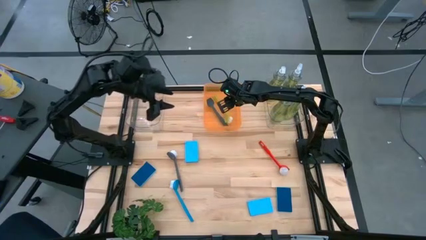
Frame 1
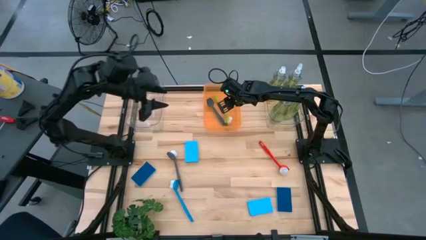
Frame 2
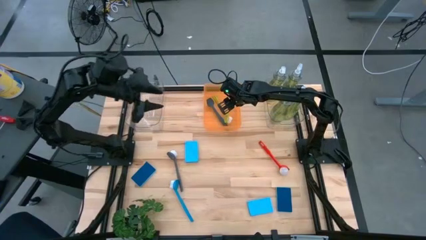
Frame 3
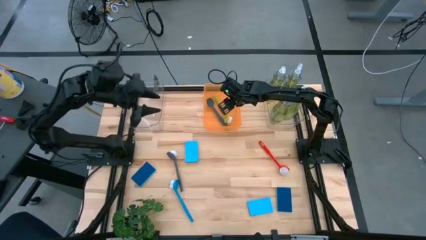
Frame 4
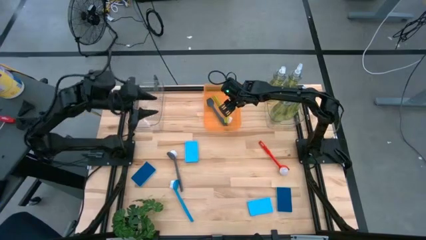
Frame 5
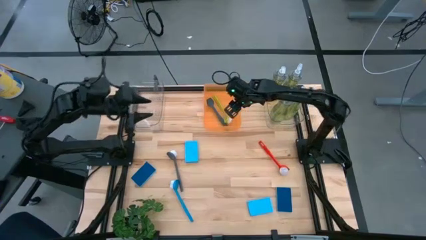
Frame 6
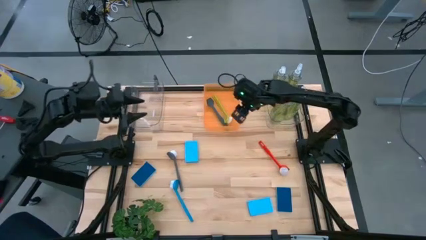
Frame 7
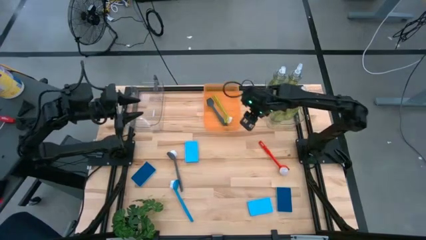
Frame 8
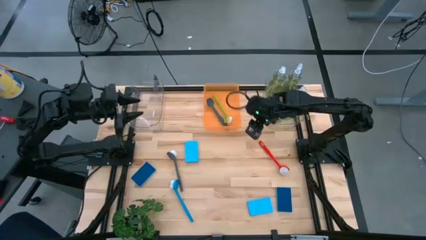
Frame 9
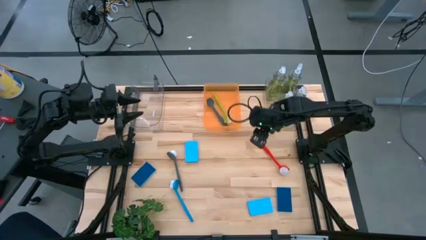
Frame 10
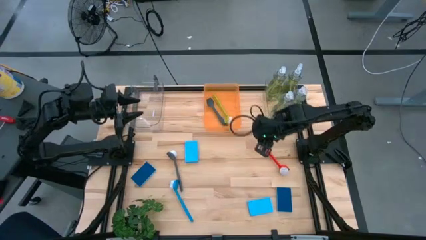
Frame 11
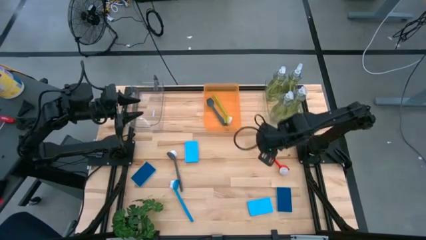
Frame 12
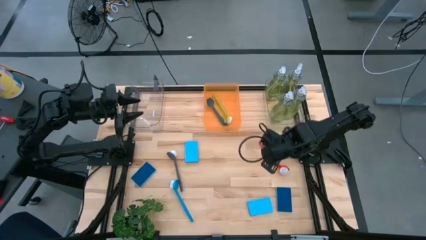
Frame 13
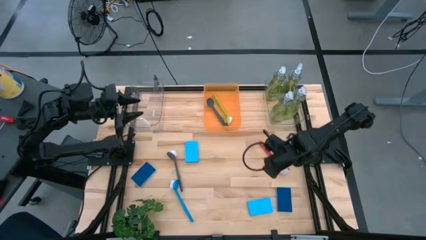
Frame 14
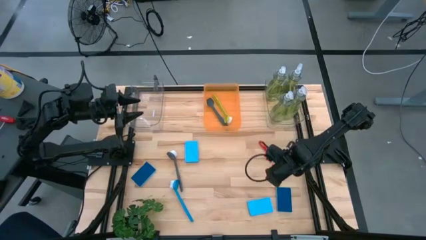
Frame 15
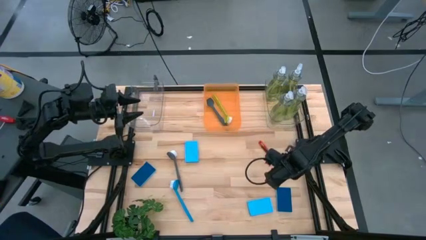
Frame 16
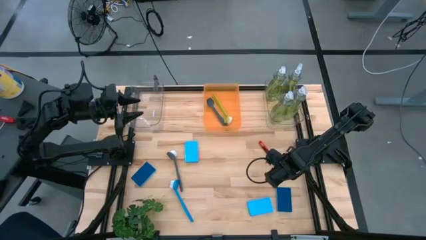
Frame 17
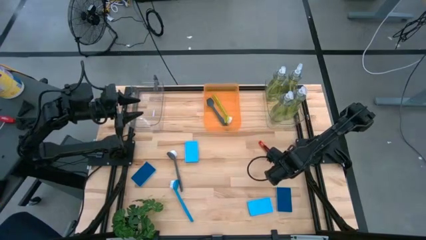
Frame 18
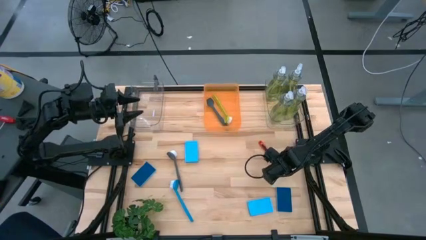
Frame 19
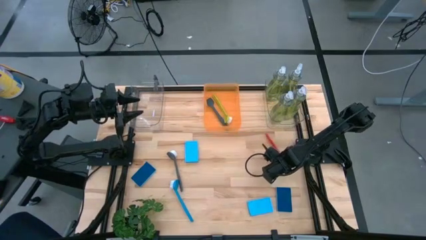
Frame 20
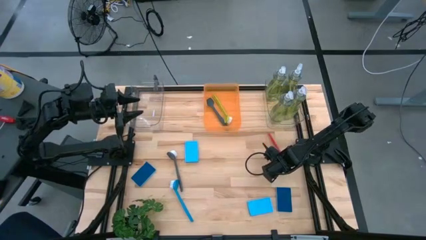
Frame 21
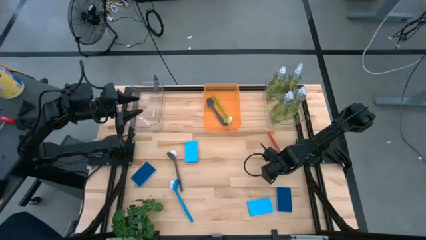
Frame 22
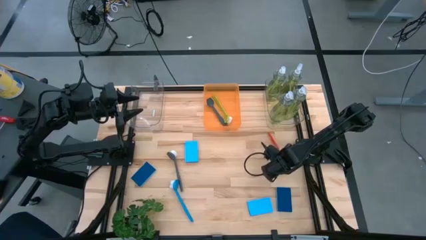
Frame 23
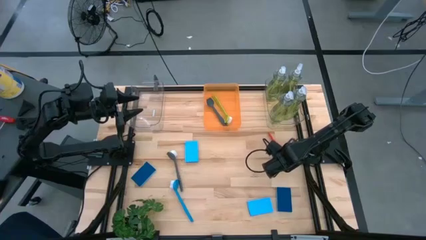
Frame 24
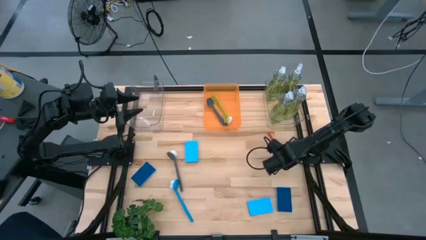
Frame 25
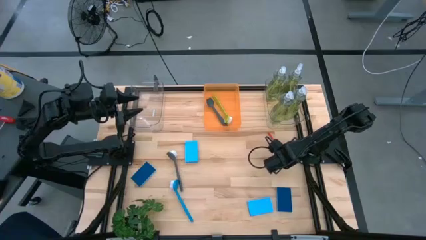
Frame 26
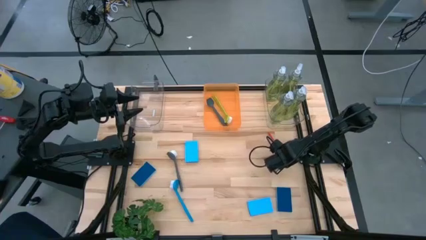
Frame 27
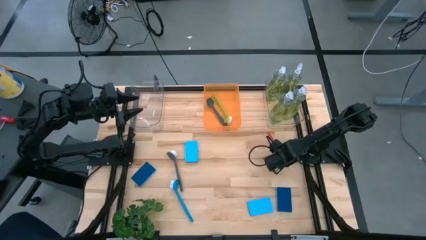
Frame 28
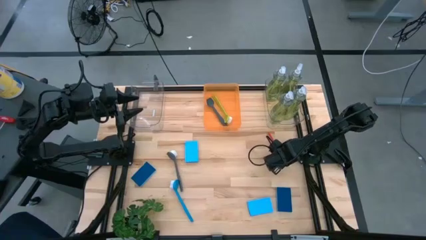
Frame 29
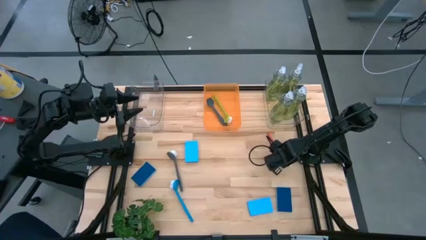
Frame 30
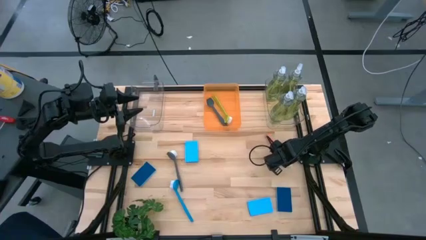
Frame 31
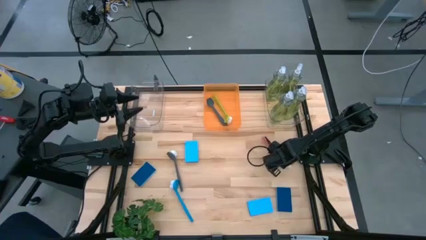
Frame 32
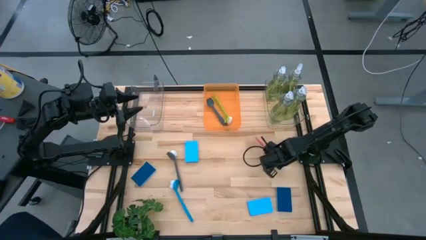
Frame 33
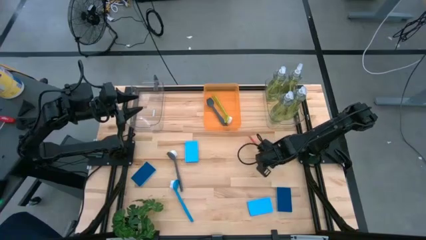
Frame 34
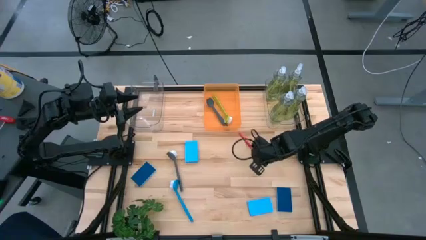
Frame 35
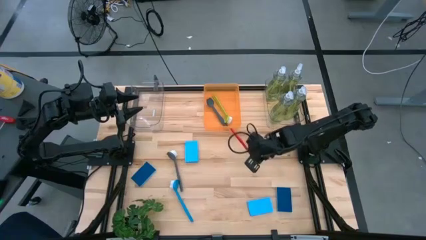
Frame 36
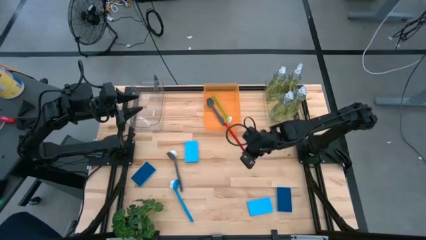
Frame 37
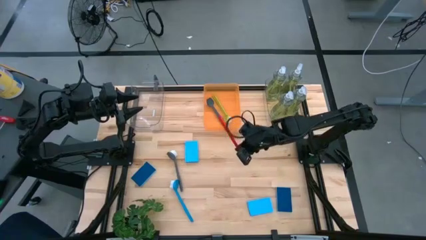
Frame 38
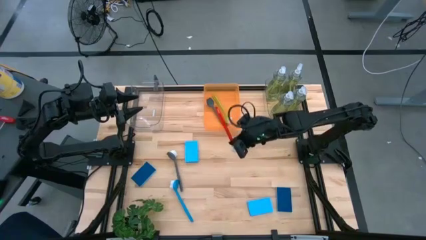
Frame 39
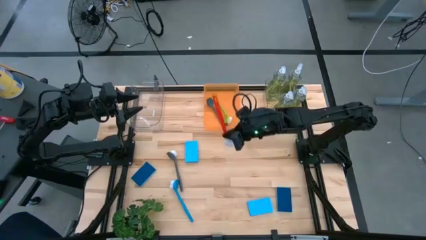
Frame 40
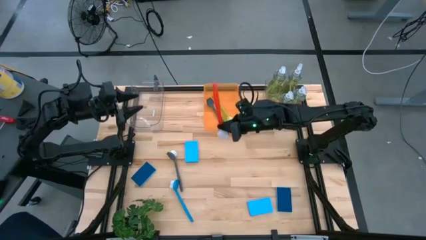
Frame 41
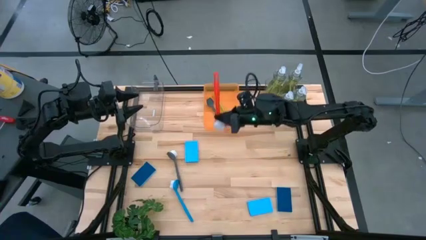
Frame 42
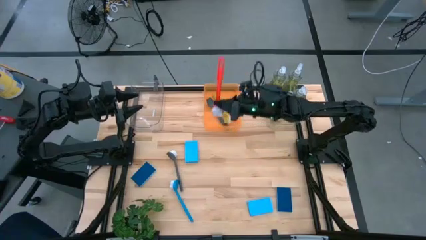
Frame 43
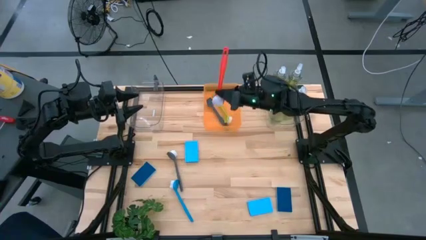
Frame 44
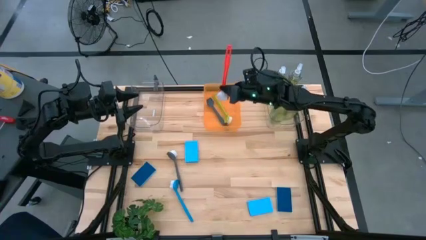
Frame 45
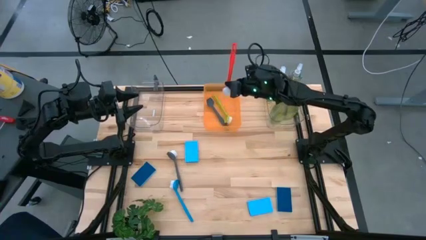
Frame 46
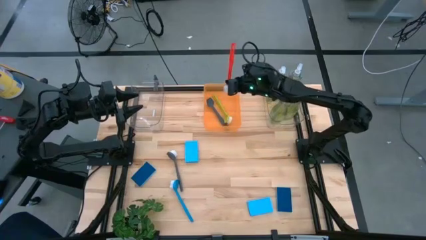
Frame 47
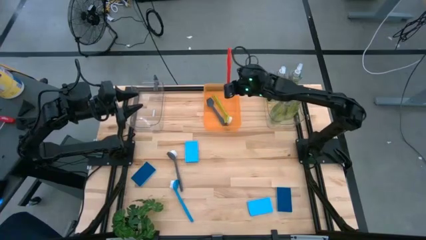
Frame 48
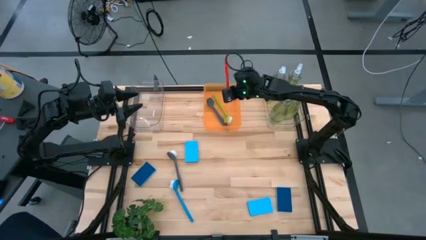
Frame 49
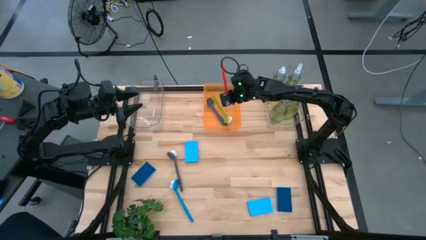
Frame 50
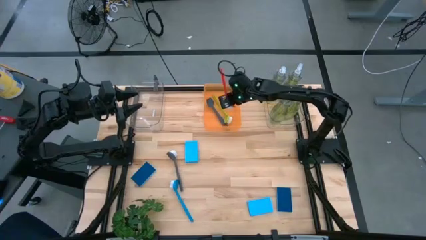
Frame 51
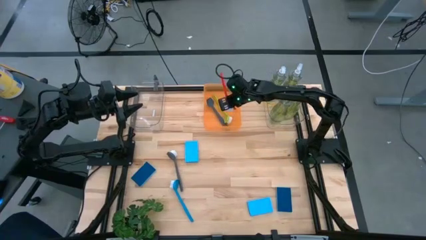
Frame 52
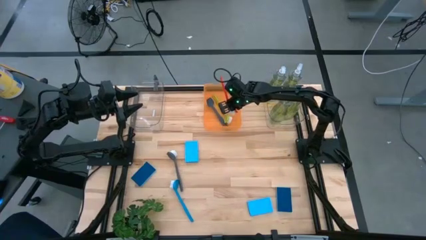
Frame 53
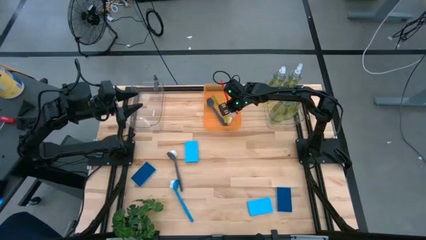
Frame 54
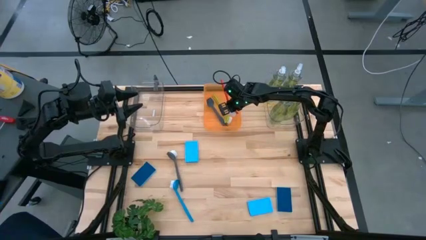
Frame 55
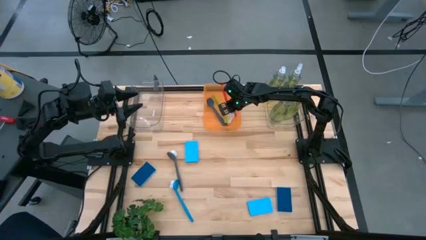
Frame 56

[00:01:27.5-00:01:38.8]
Task: Pick & Place Kitchen Sink Supplies
Put the red dish brush into the orange bin

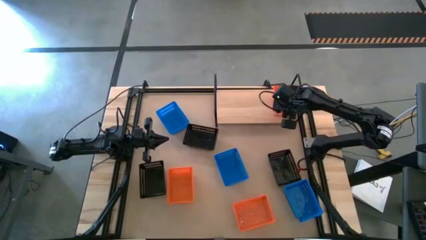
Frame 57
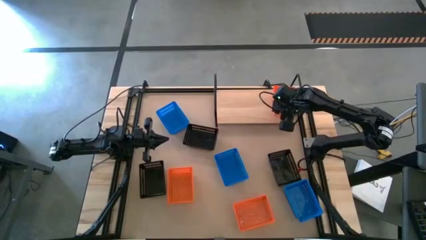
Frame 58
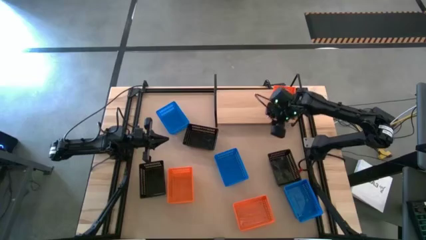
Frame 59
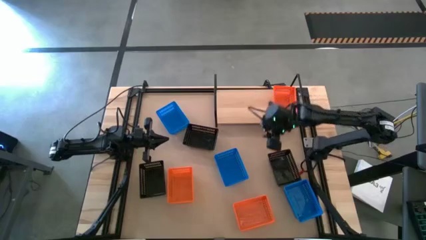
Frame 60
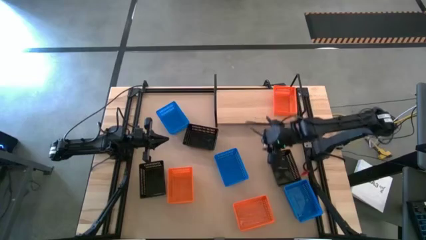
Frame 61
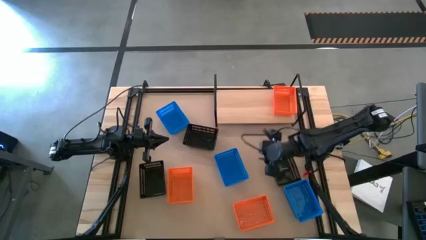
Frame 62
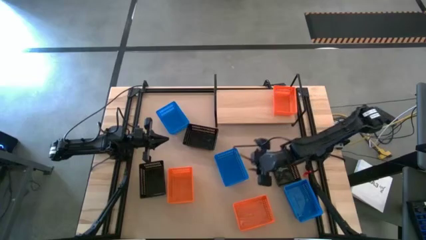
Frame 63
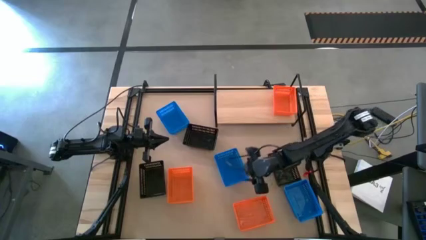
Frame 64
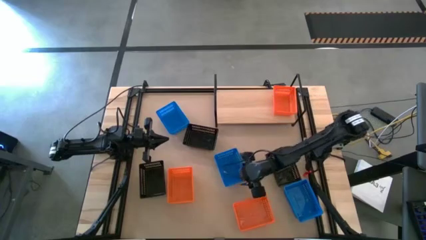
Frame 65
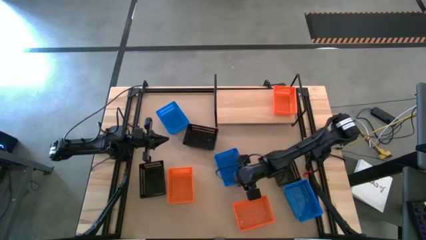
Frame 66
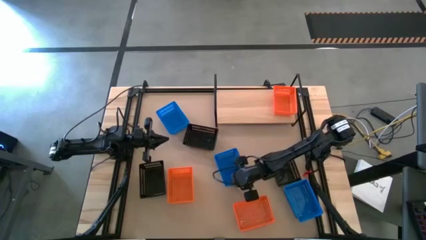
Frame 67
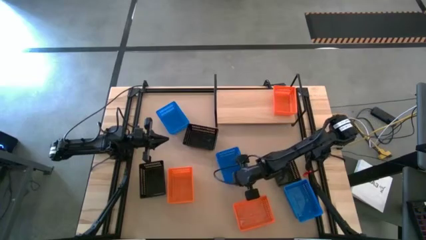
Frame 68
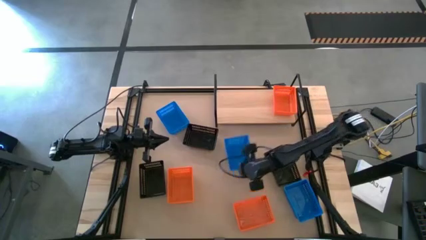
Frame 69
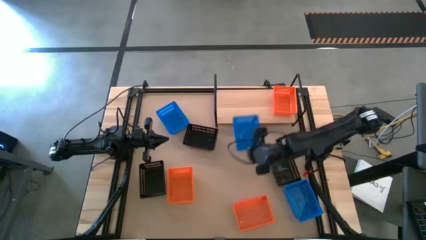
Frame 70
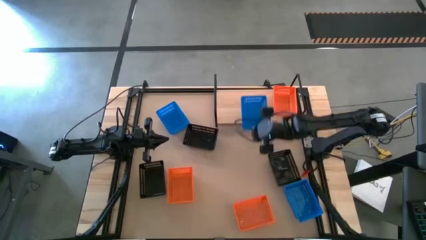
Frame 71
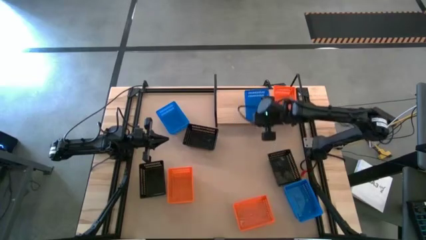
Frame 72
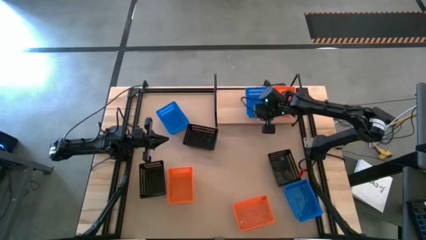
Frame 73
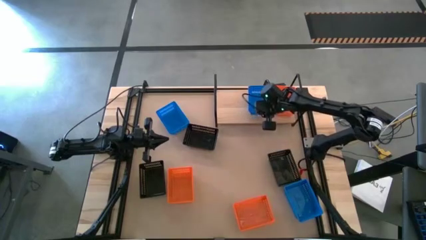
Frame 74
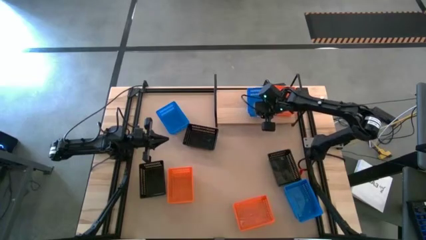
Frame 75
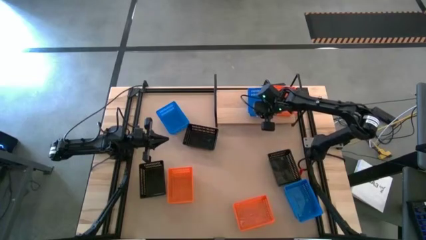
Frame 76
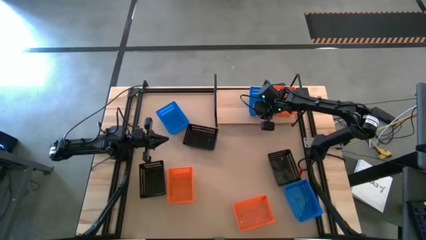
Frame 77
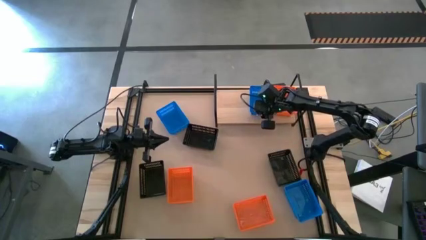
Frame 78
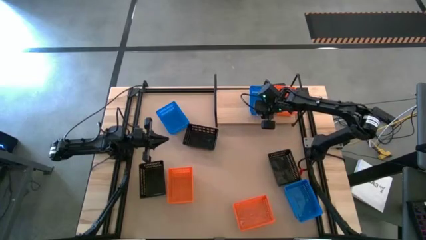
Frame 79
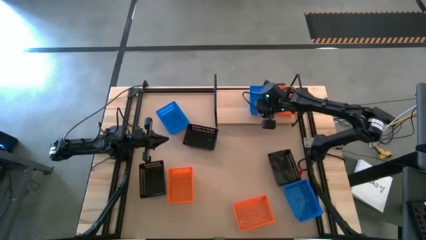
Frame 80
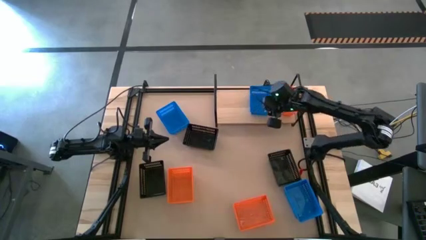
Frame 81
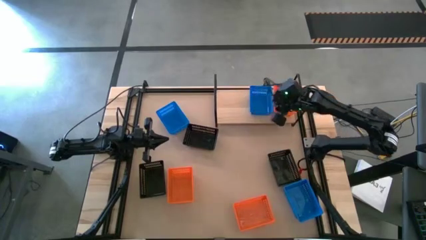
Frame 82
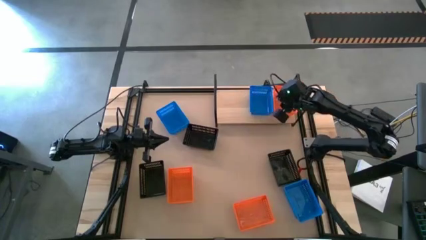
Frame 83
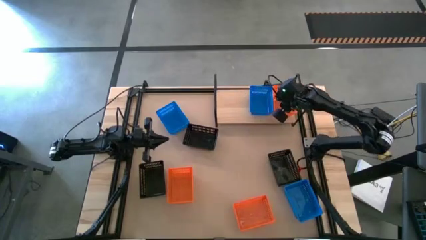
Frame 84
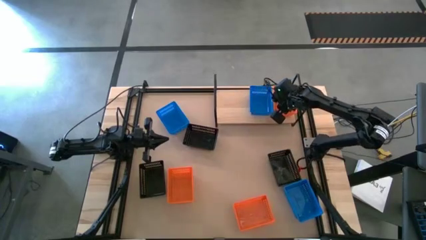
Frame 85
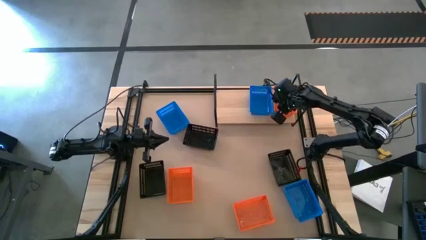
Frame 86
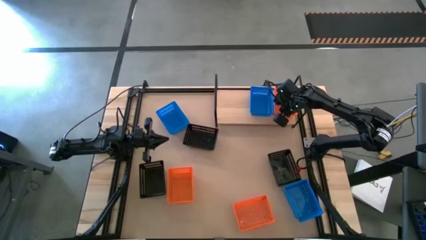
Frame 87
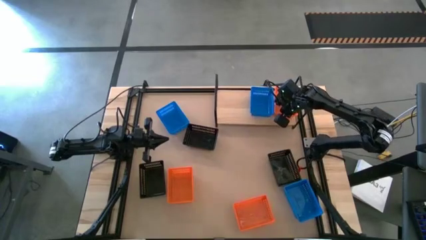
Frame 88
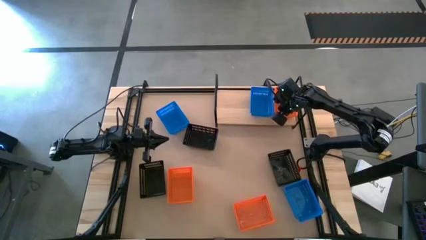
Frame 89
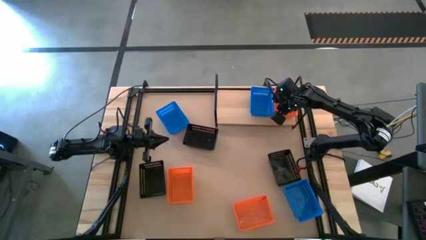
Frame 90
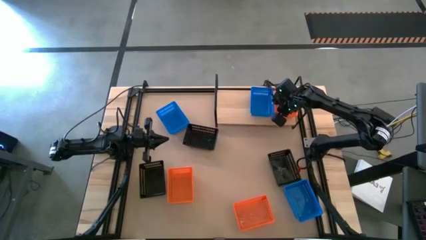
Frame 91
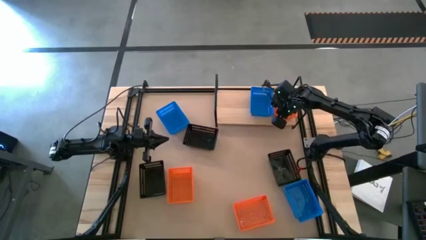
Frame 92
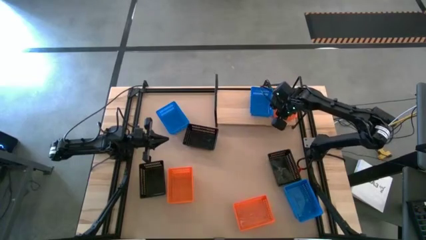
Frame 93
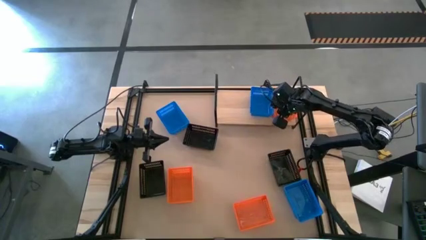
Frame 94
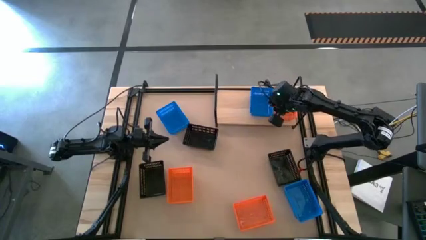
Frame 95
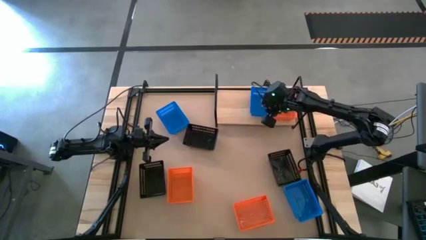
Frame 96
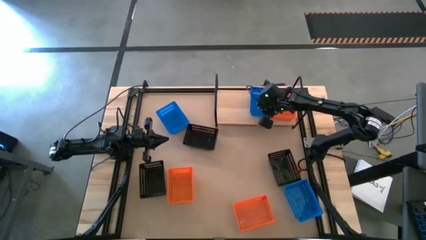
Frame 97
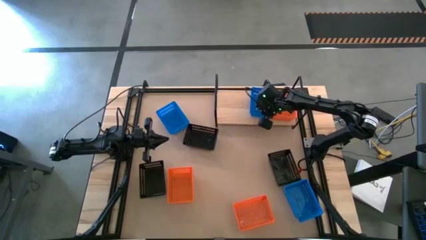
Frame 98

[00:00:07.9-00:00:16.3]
Task: Stack baskets on shelf by color
Put the middle blue bin on the shelf
